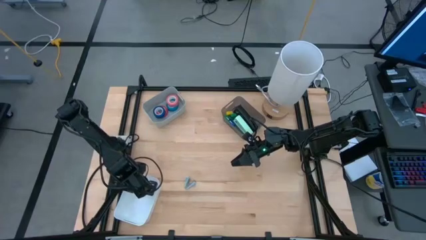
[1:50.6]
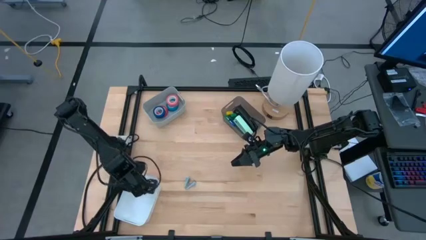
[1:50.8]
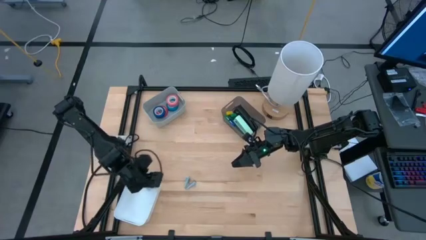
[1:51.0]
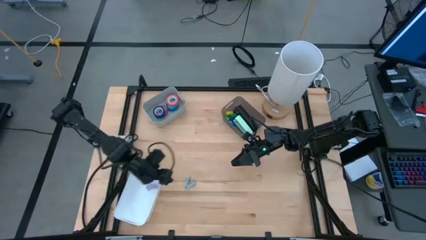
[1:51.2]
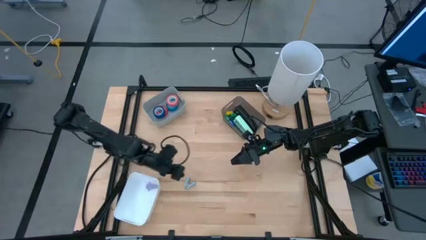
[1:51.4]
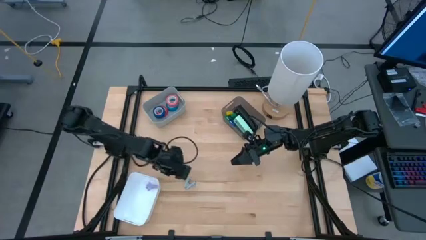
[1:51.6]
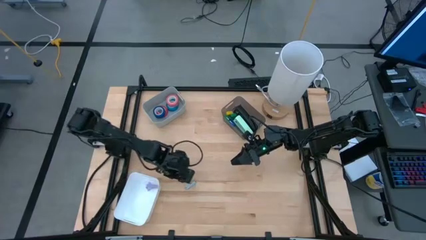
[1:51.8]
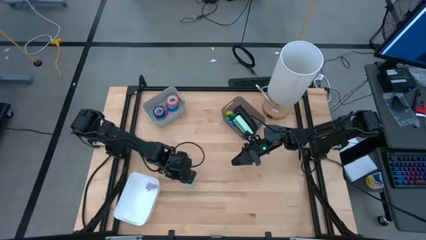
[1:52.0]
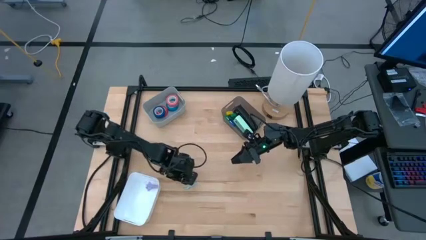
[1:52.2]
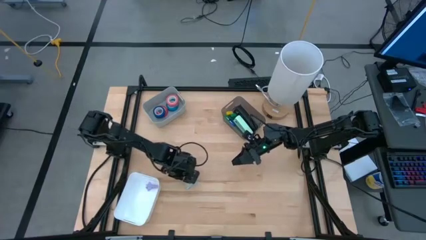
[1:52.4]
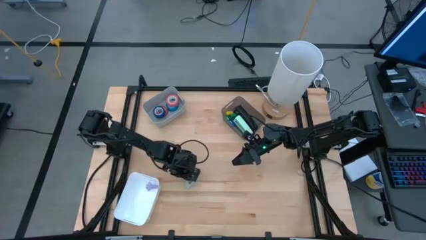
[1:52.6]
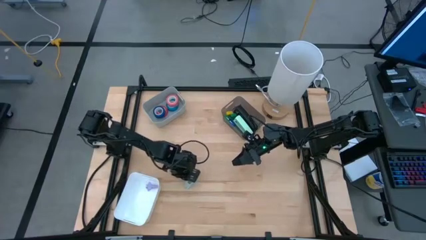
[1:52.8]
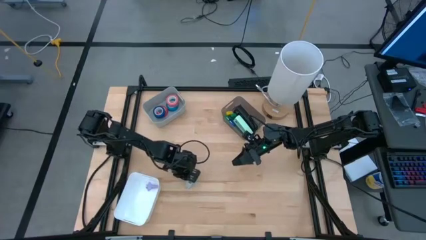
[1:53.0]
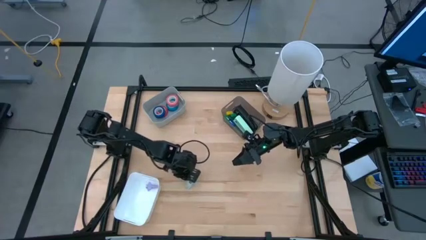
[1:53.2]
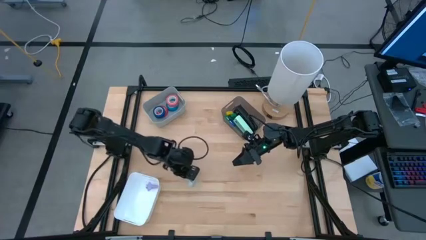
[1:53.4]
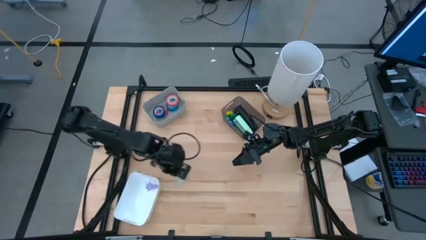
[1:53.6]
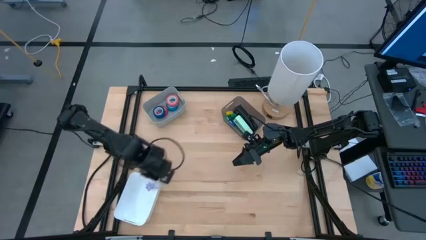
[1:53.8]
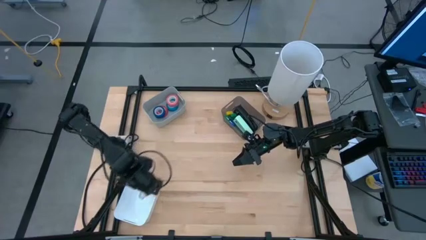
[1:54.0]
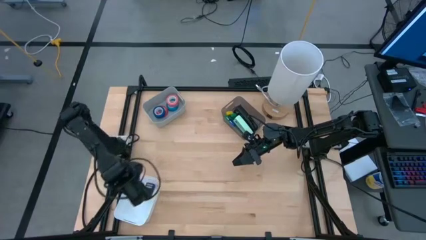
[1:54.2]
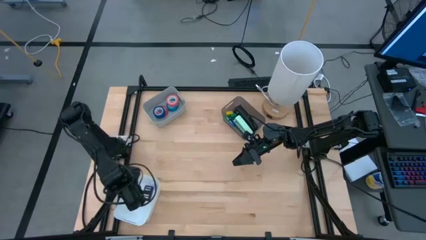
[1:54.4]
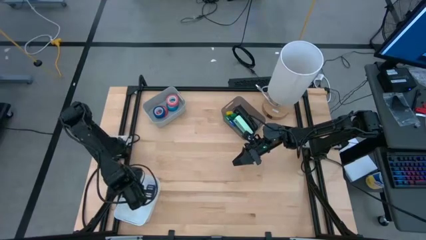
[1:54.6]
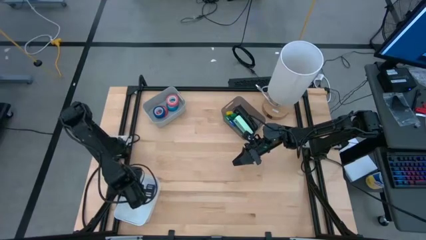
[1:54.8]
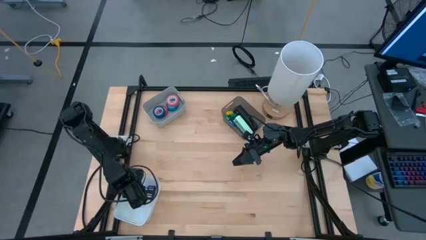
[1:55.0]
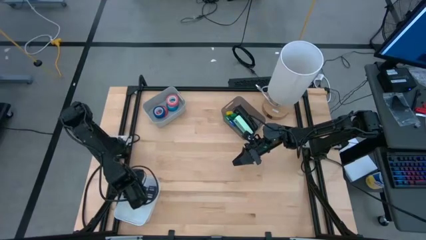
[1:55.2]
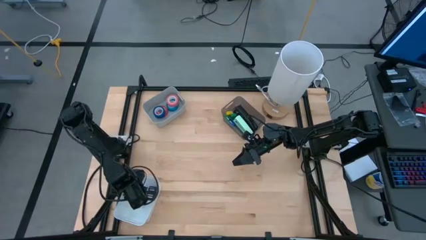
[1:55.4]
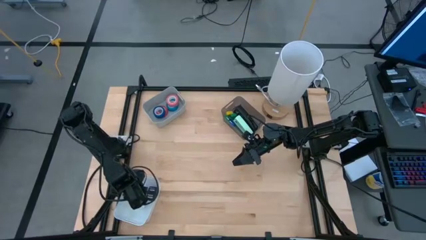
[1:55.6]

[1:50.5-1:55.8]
Task: Pick and place Stapler, Stapler remover, tape
Put the turquoise staple remover into the white bin

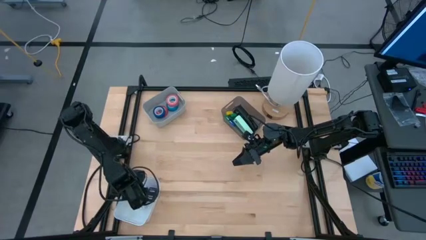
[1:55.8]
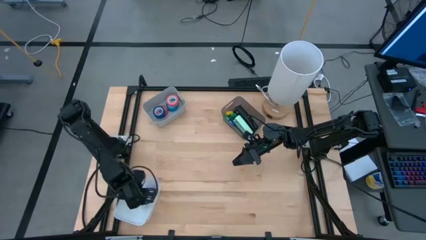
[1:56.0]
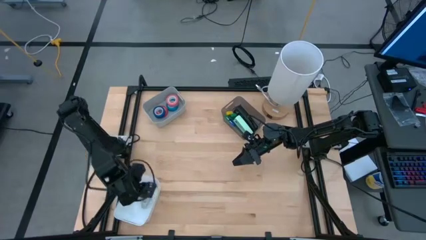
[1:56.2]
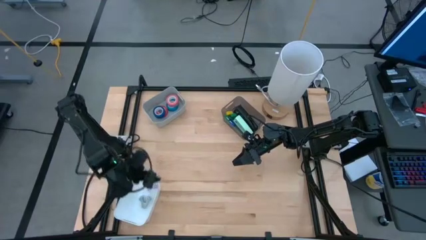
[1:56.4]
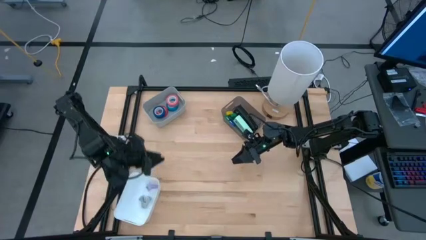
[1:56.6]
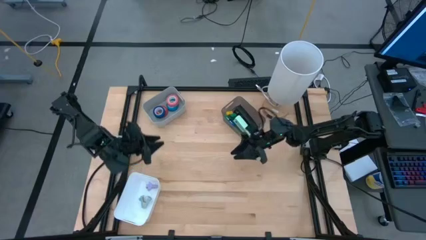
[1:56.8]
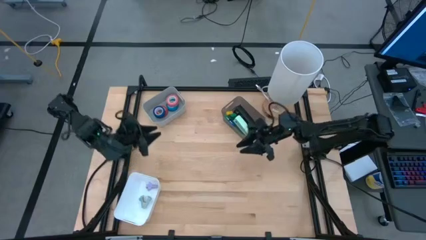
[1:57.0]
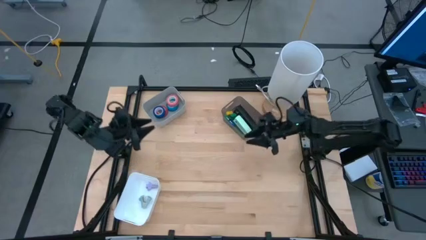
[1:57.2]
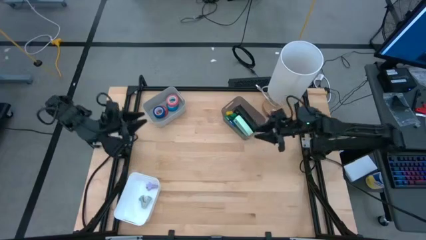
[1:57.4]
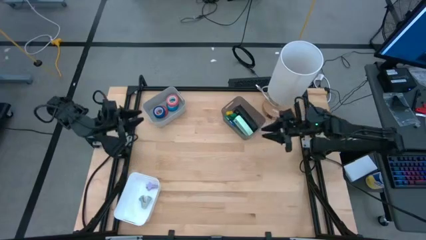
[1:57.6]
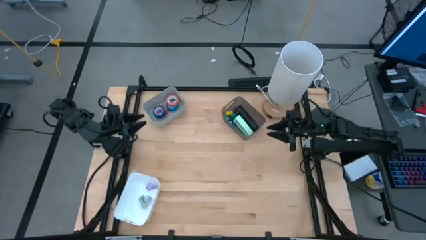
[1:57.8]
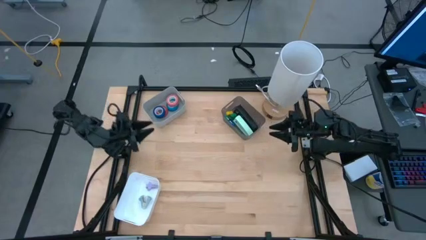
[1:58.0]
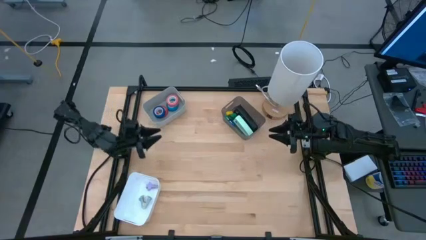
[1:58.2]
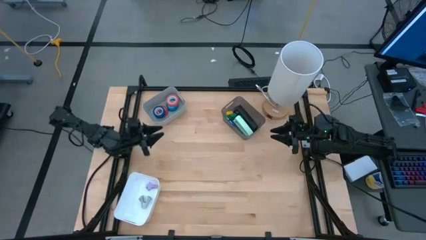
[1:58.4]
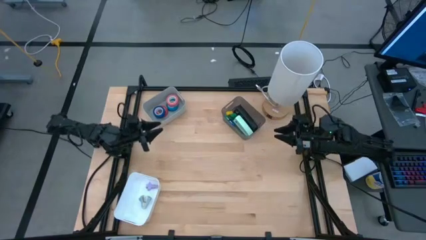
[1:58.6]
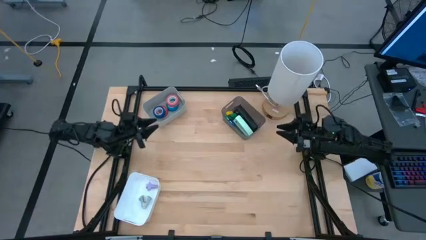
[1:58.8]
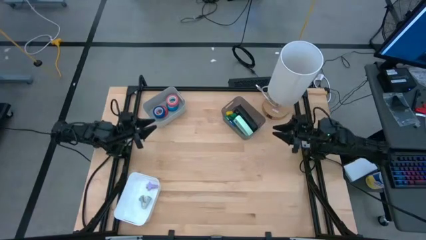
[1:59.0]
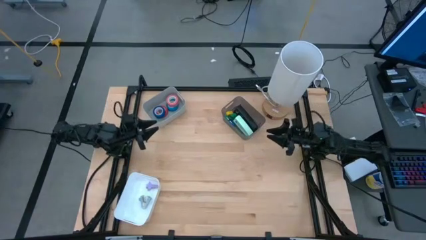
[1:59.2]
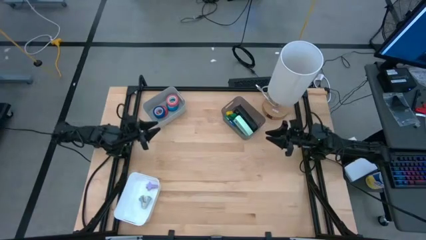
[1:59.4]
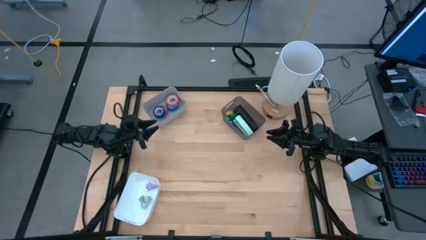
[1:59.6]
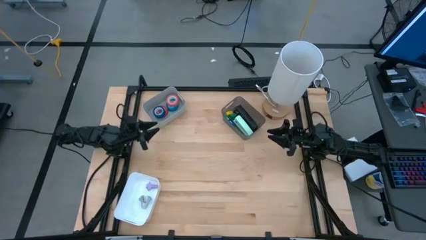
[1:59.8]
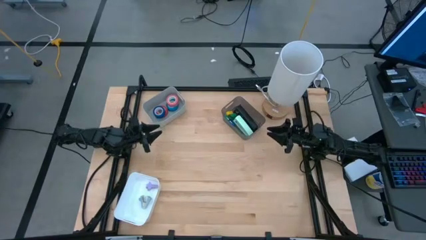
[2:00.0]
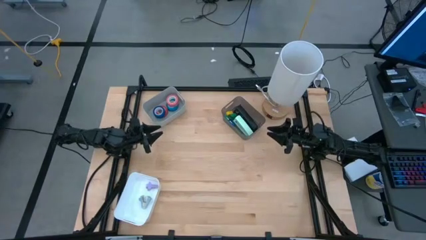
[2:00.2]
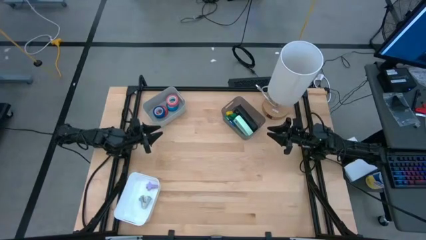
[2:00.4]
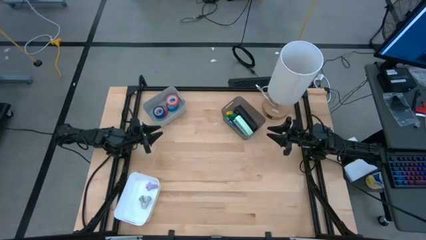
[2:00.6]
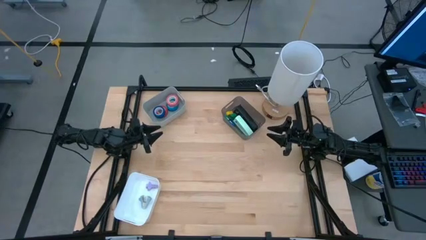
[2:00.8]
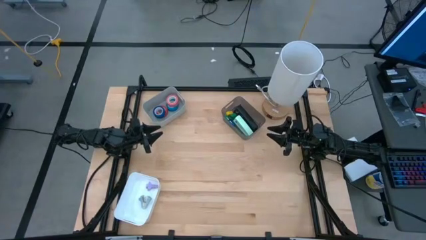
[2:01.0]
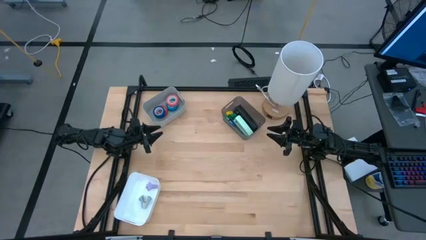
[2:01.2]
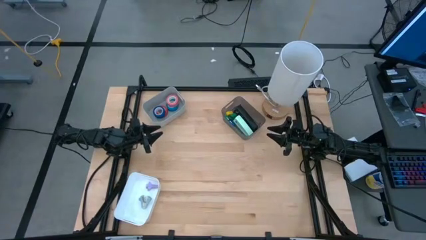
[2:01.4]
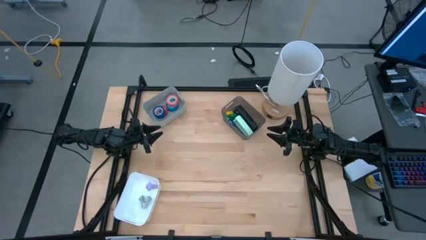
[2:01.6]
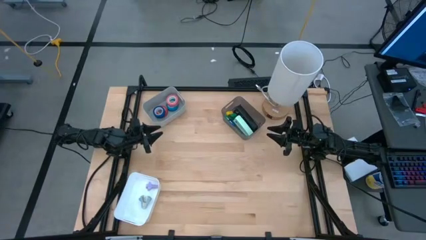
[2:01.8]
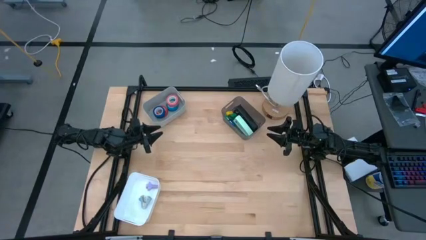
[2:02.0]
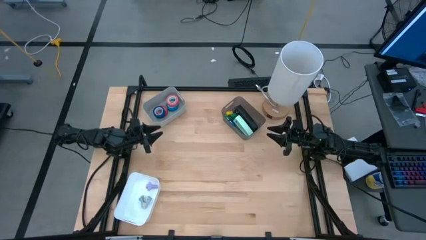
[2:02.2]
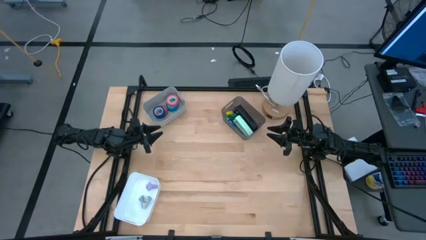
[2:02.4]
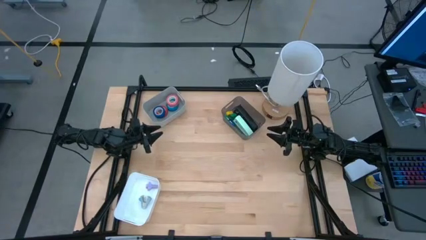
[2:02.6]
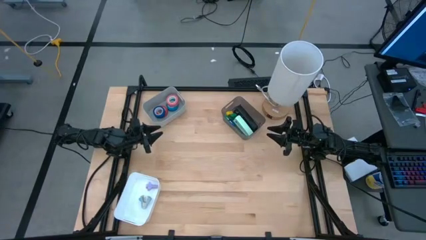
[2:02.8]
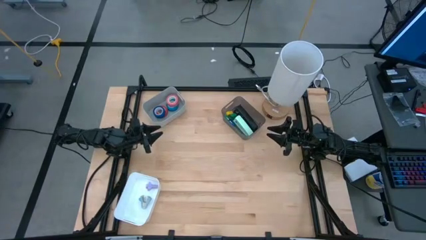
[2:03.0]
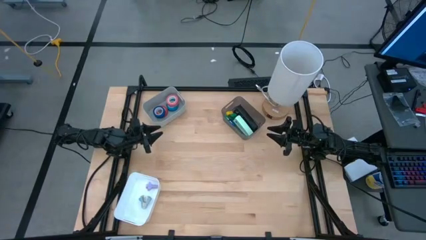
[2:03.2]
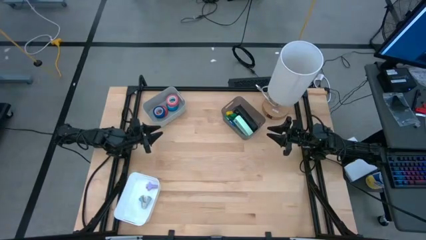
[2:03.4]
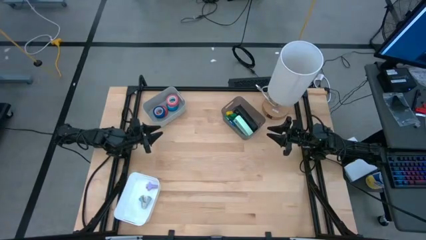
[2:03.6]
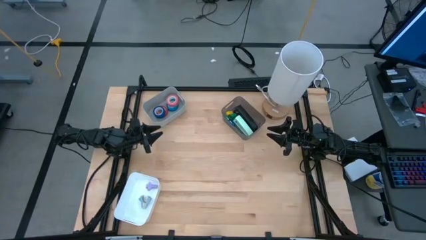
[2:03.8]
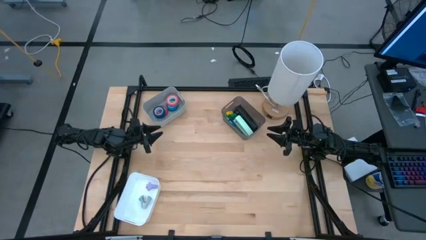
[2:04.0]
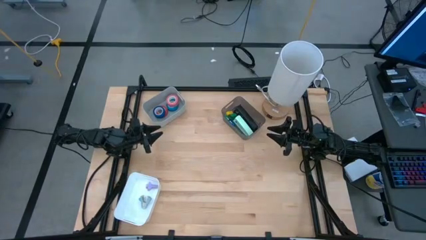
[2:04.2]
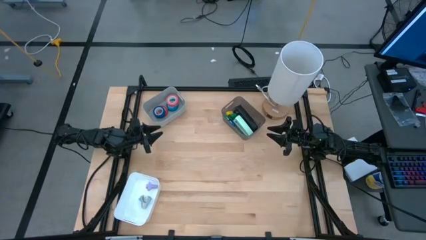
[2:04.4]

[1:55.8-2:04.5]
Return to Home Position

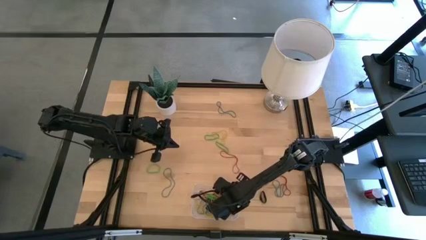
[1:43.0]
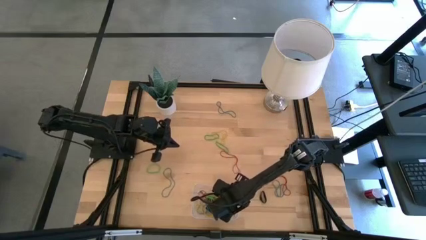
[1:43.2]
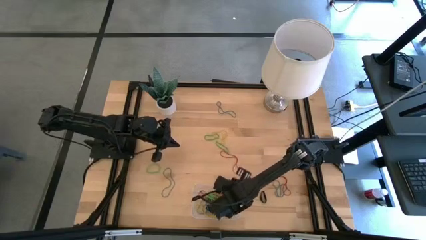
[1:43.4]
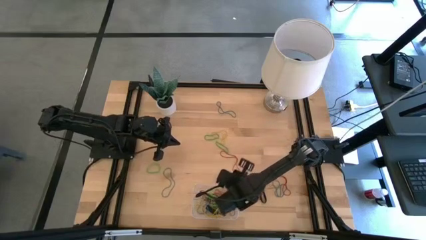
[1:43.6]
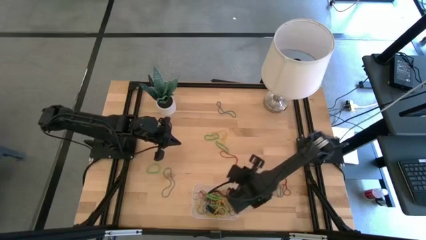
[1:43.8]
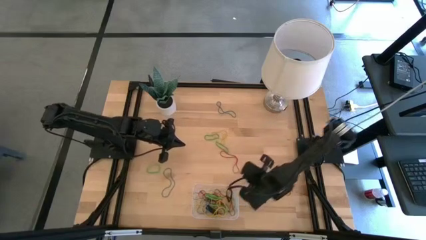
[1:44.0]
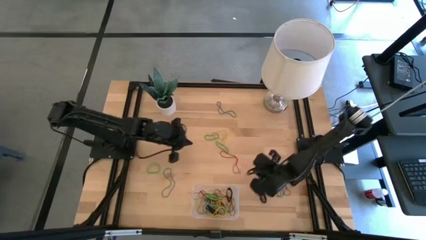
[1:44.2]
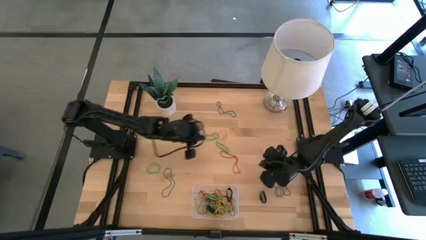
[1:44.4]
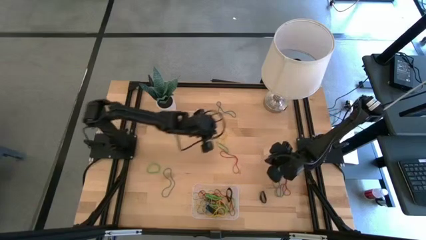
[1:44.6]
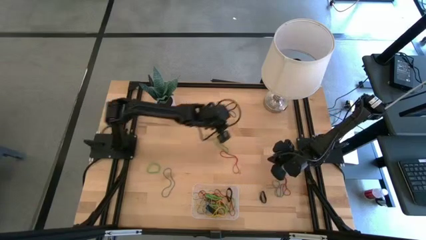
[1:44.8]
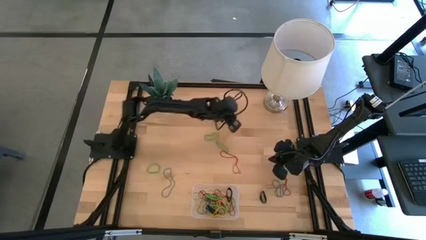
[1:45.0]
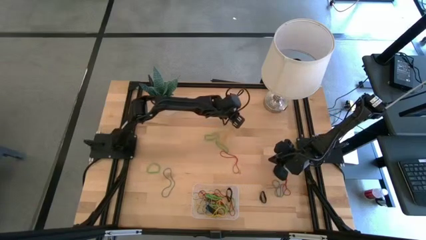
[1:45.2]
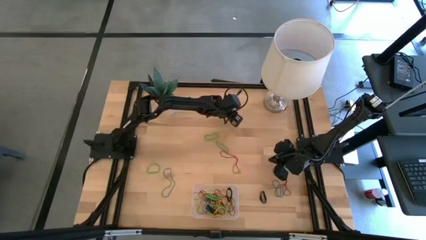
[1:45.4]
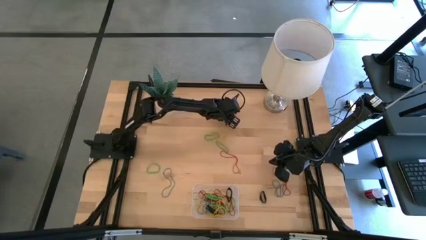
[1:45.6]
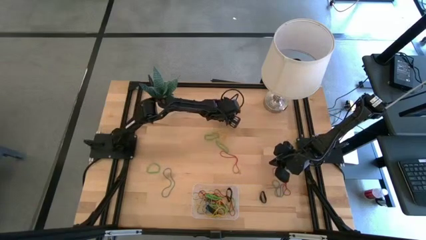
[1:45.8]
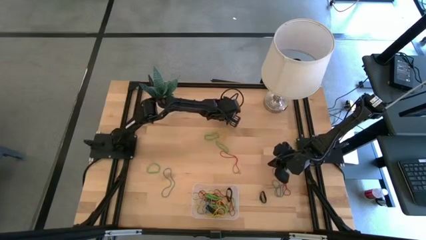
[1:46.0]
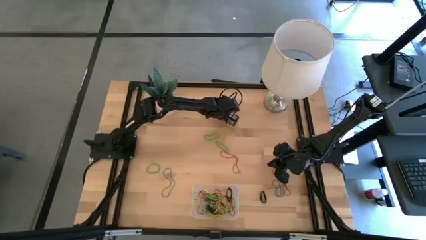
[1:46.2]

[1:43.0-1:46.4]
Task: Pick and place rubber bands into bin
Put the blue rubber band into the transparent bin
